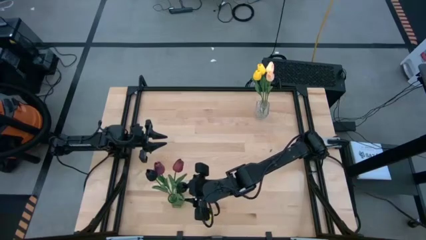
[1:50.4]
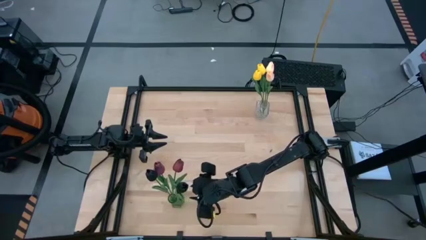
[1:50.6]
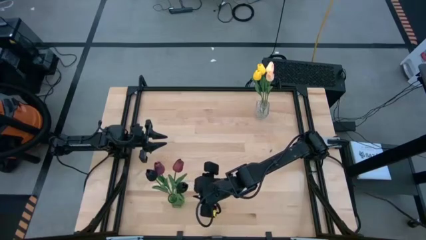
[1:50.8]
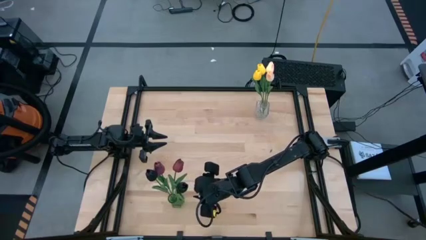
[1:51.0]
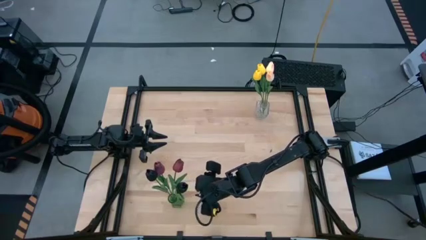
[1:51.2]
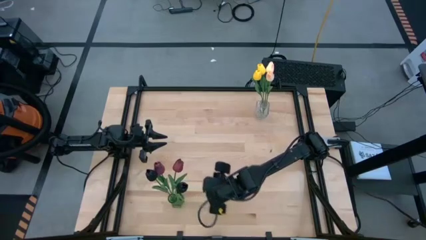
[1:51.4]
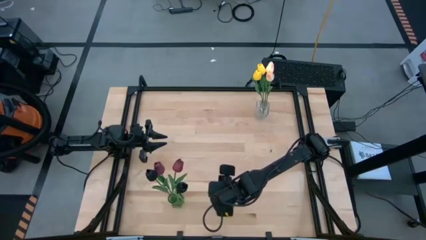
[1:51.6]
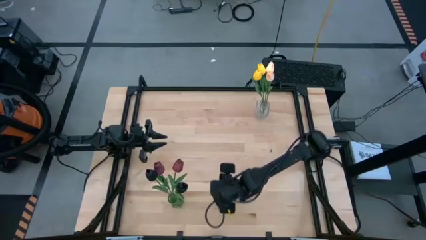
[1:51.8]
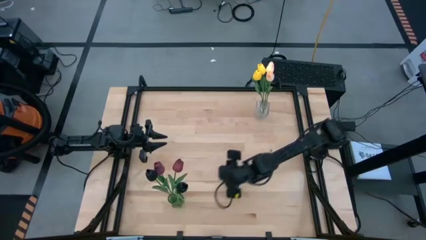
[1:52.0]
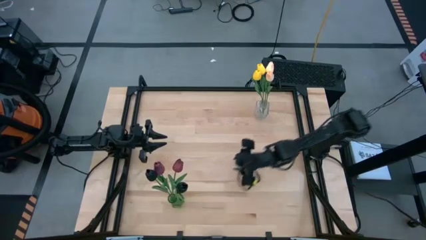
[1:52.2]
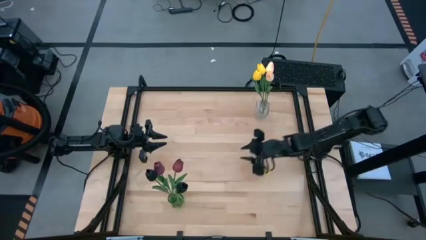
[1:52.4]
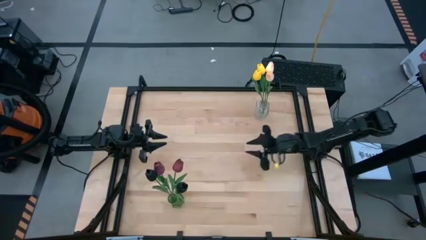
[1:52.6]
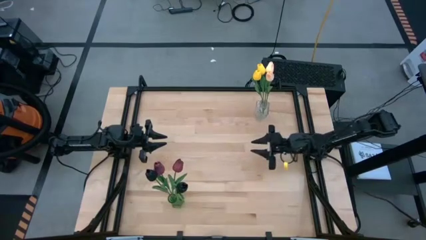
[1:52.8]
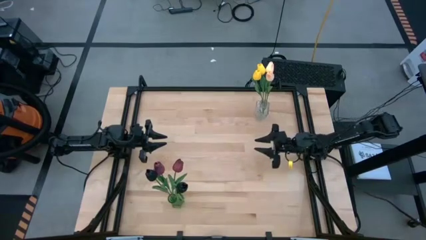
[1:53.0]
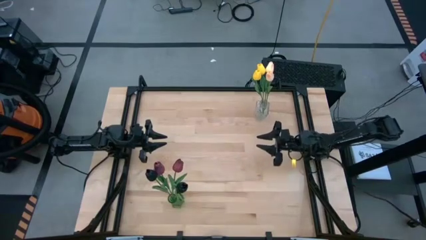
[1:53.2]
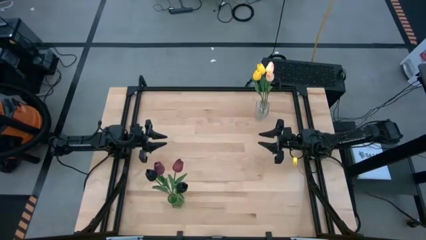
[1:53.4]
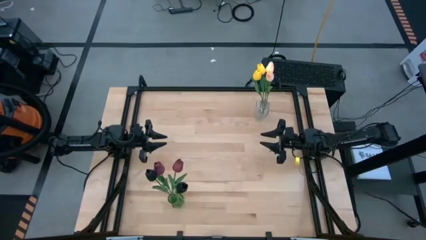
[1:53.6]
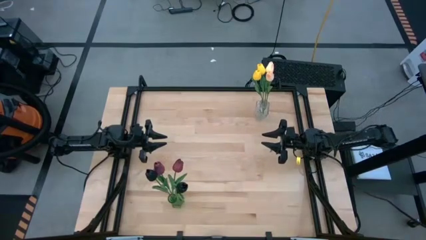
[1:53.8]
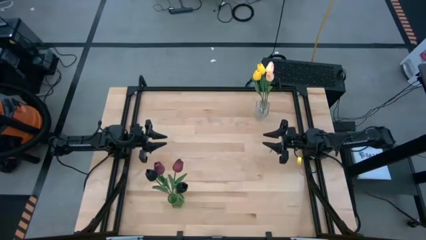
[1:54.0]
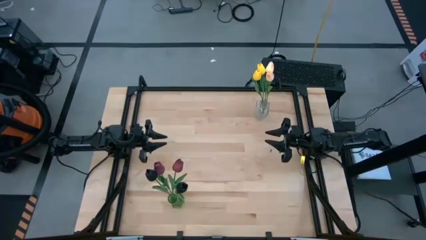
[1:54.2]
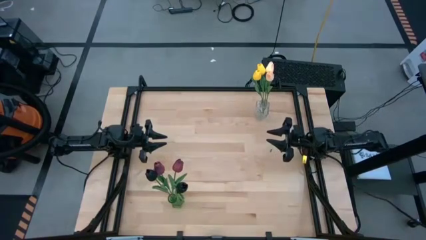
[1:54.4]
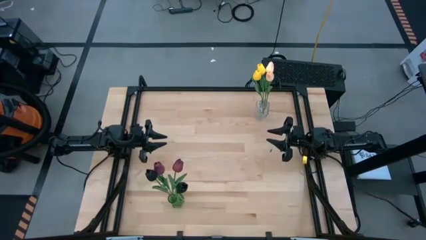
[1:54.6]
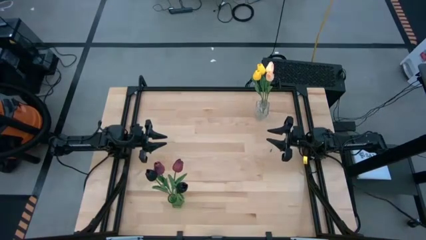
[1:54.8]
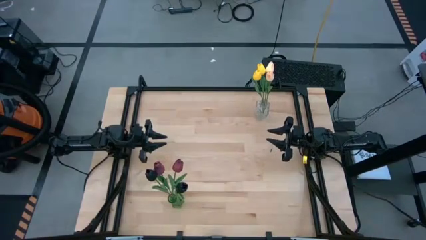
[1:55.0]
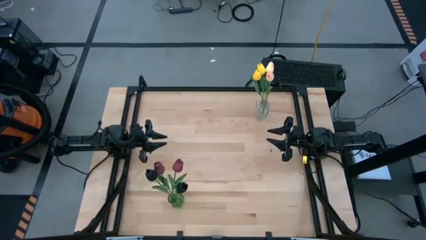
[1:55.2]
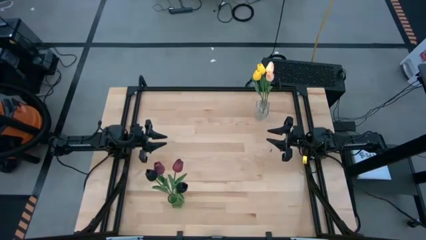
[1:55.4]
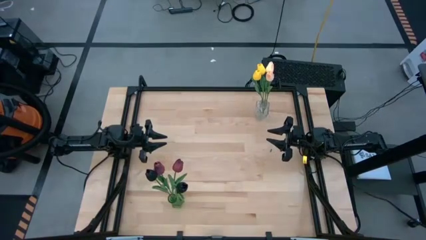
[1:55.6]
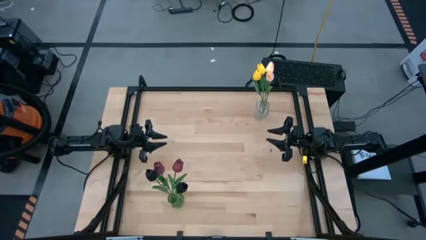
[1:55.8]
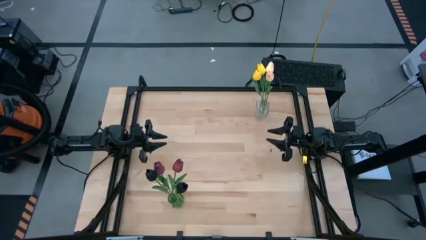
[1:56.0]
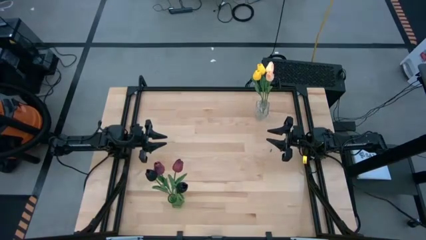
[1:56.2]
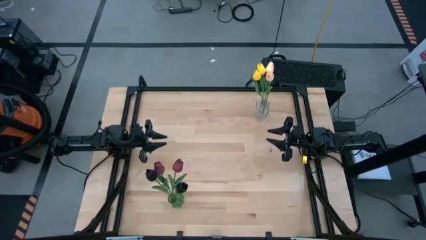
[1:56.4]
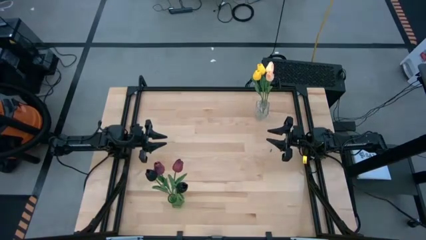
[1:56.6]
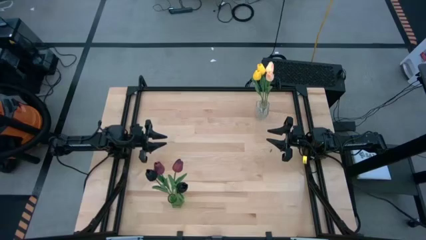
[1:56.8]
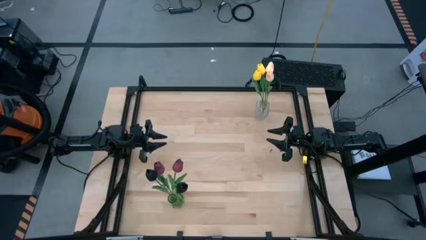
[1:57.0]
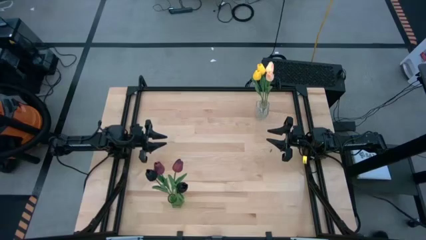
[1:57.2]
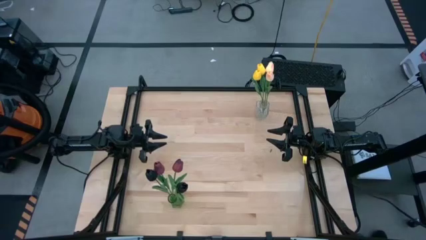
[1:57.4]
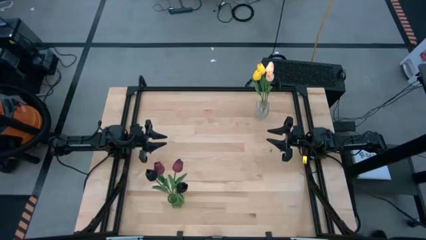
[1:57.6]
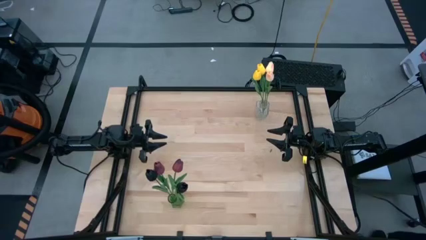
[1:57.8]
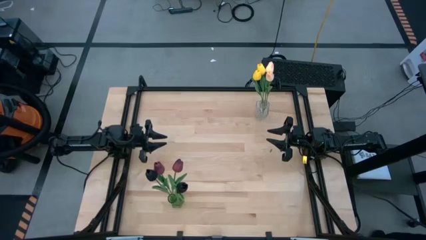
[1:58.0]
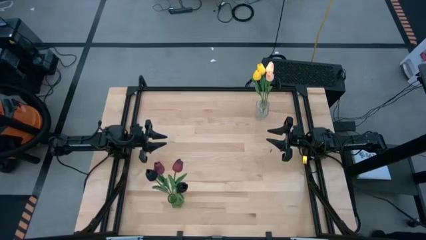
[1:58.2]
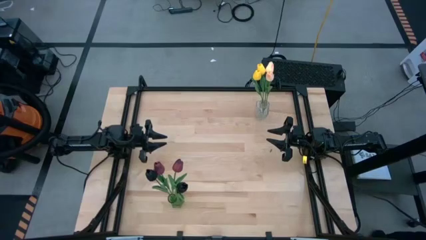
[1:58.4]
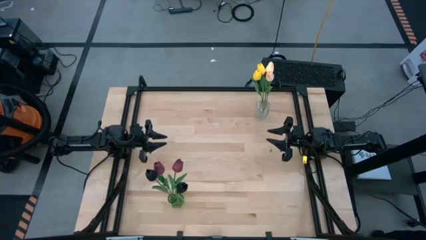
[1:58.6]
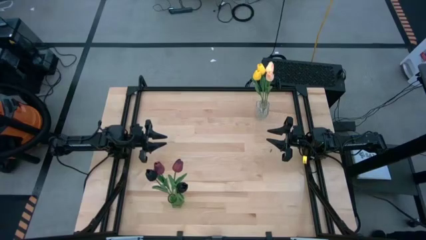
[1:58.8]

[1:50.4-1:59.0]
Task: Sort flowers into vase by color
Return to Home Position

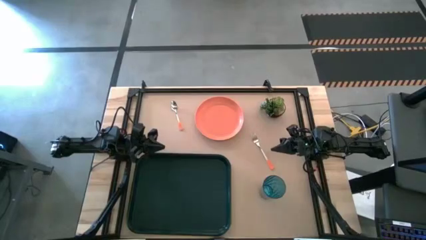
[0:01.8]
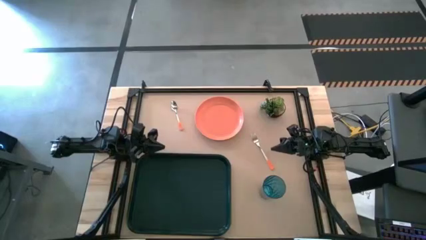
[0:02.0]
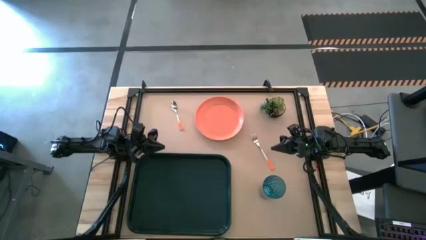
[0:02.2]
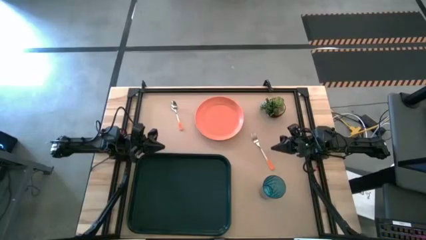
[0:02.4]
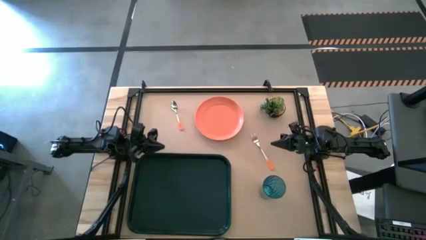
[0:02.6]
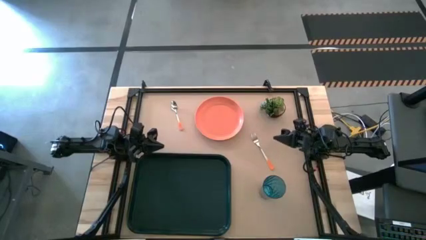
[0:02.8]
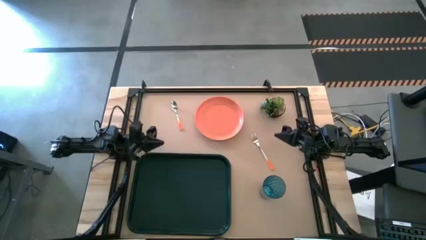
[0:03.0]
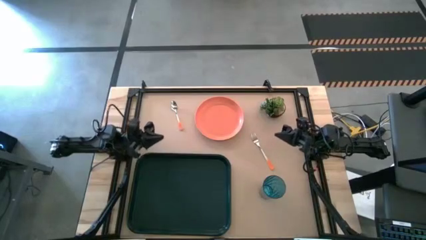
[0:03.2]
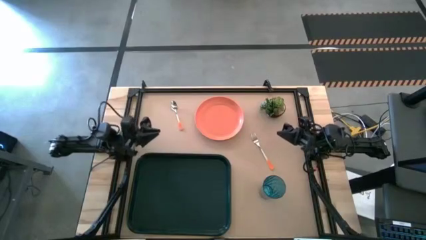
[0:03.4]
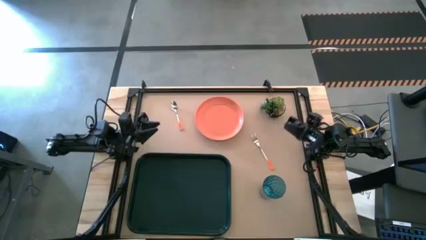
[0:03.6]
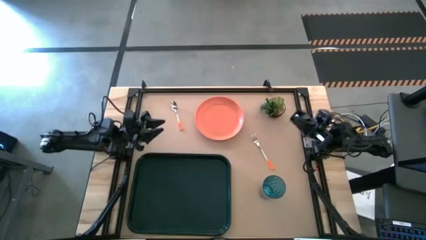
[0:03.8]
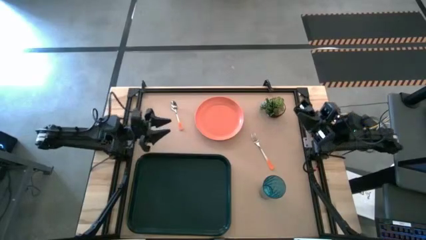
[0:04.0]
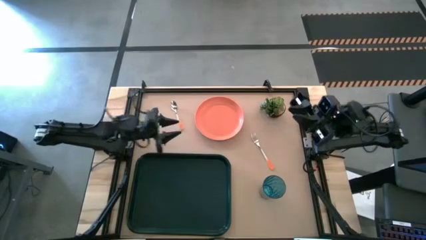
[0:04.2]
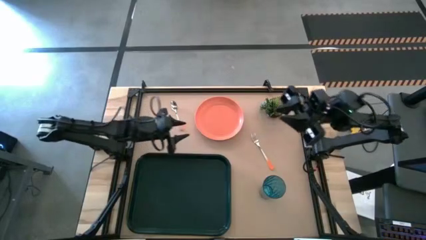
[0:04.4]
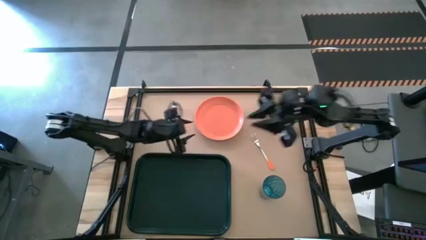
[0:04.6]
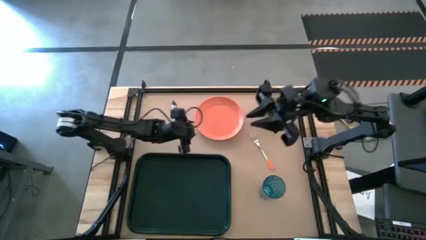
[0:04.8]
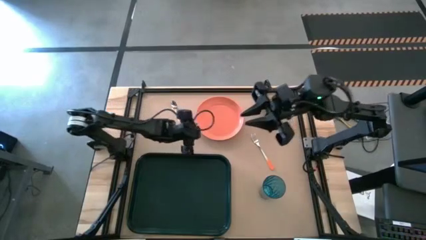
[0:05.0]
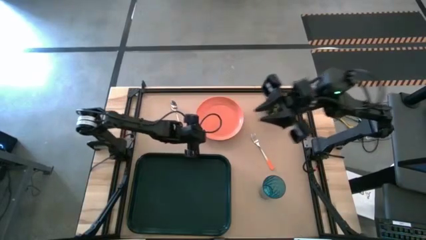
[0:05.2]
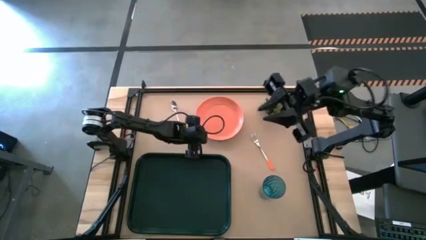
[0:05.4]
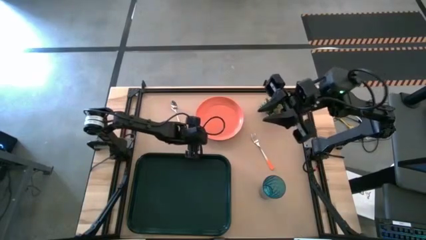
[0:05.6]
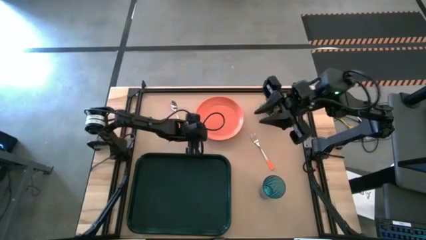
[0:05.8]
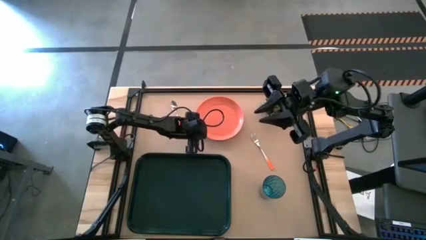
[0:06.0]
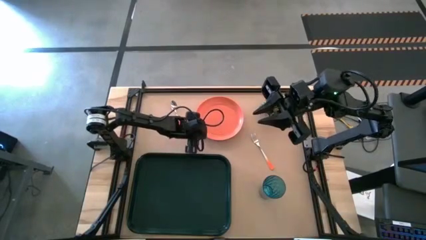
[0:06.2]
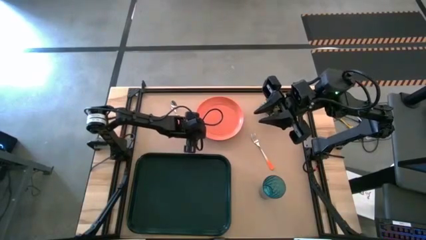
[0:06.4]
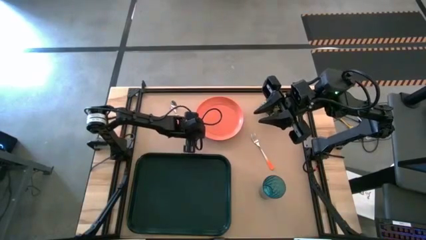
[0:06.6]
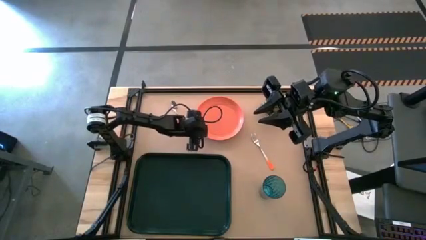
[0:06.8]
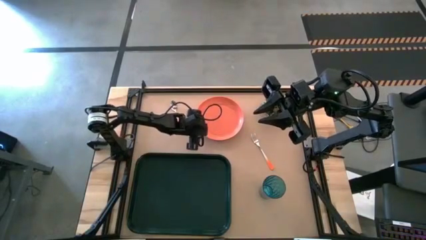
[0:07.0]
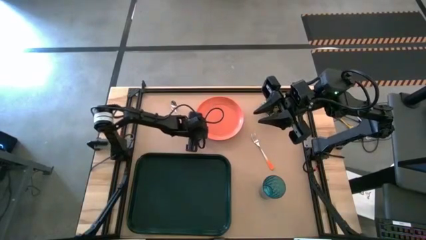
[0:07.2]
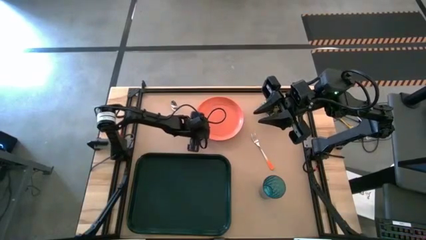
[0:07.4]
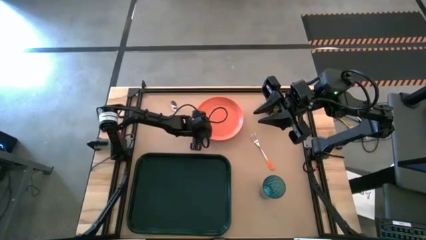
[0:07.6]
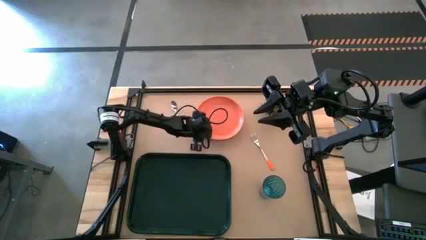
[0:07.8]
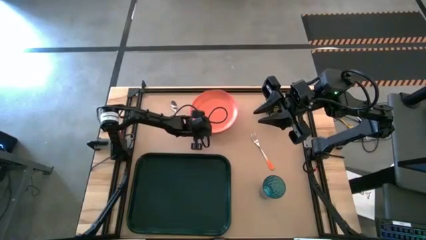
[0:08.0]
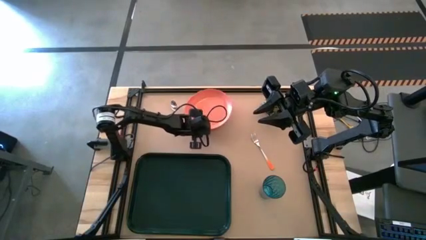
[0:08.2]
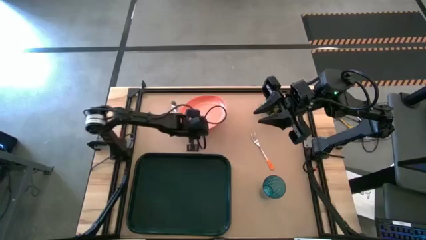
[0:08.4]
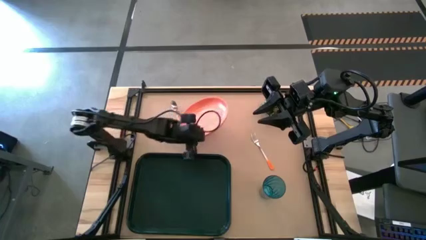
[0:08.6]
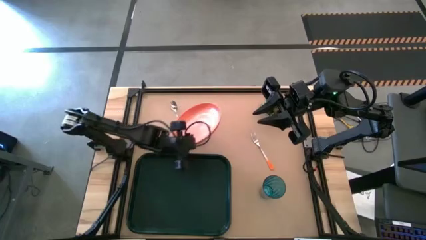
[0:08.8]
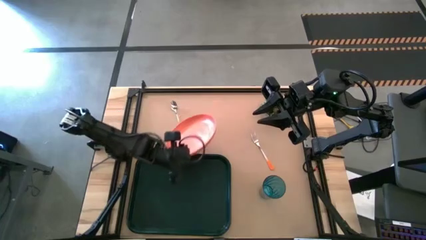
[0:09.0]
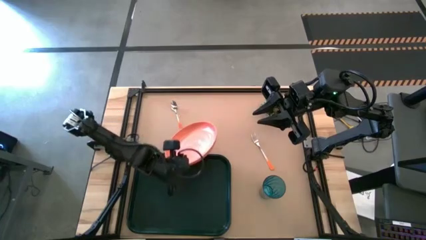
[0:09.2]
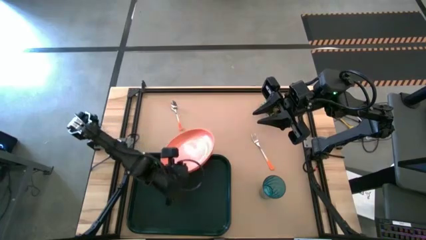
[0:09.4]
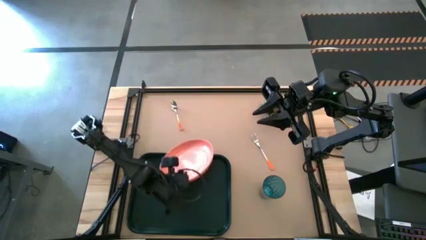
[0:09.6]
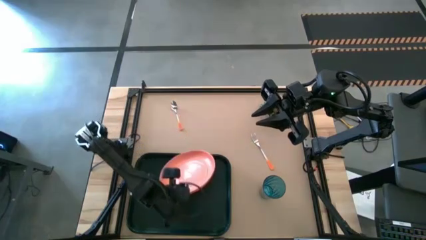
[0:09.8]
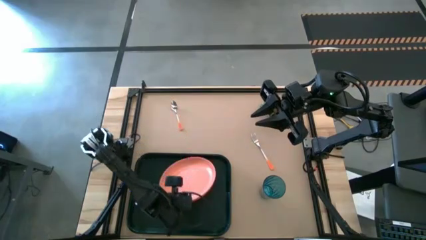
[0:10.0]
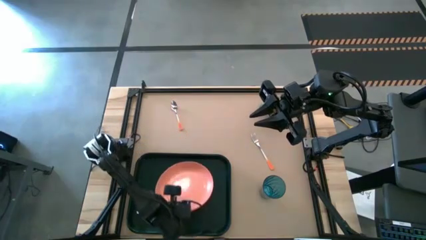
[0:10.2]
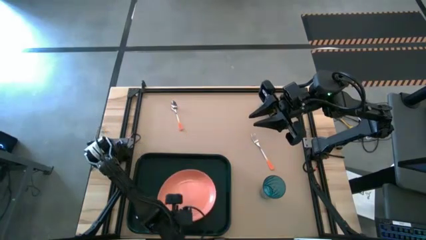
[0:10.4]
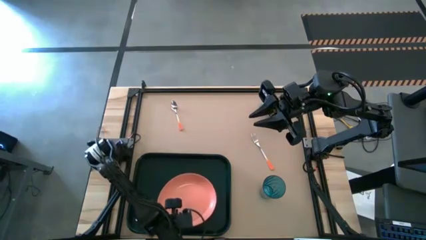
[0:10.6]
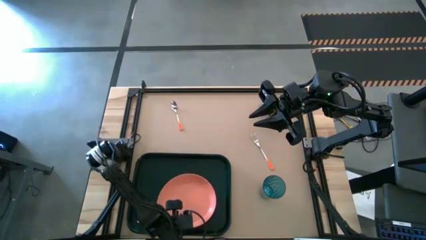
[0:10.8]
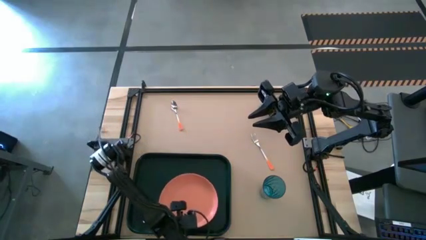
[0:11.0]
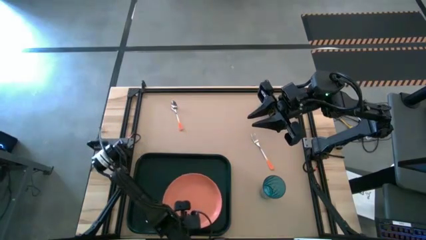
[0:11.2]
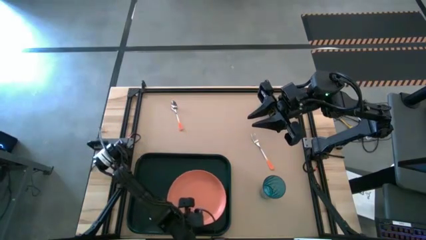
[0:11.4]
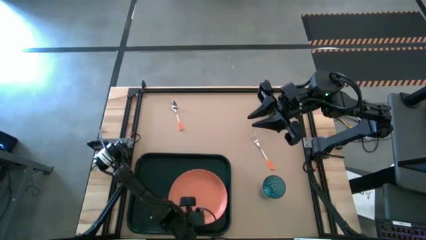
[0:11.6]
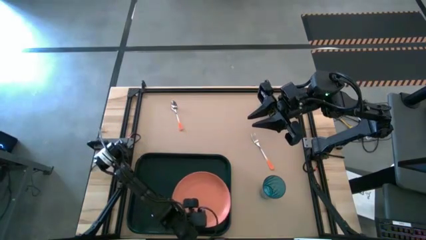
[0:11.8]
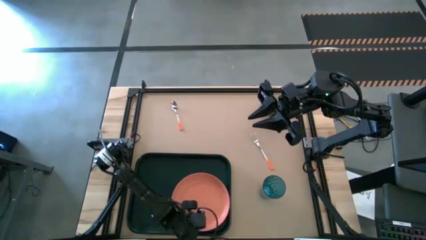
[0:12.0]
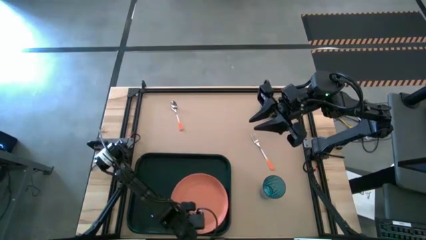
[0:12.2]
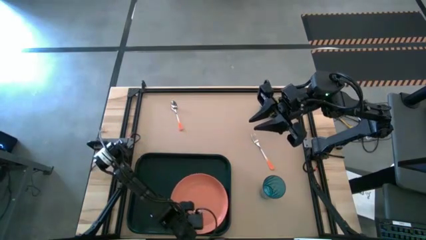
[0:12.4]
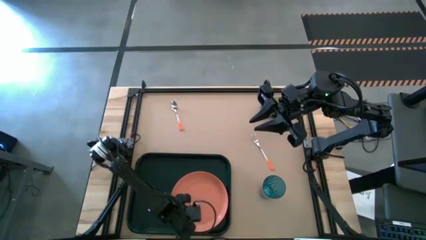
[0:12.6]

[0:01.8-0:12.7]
Task: Pick and place plate/cup/fork/spoon on tray
Put the light red plate on the dark tray
